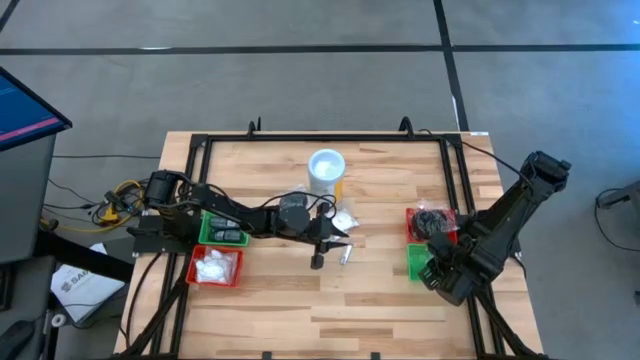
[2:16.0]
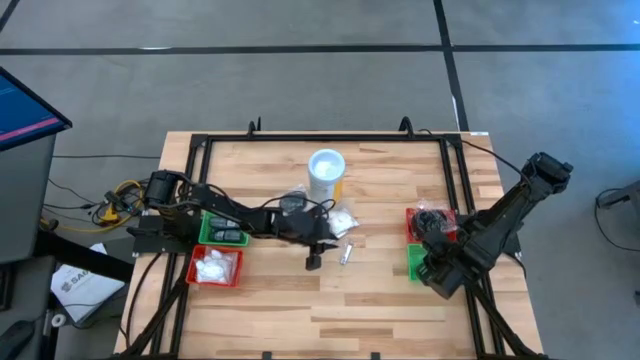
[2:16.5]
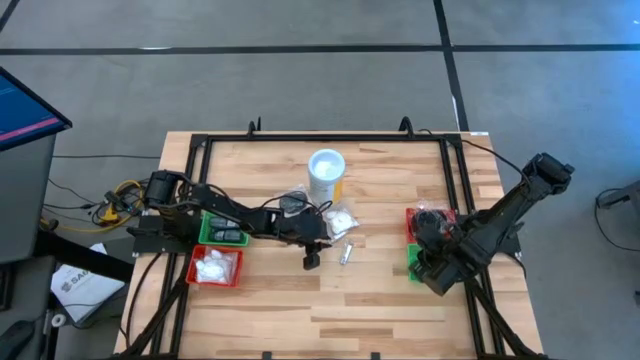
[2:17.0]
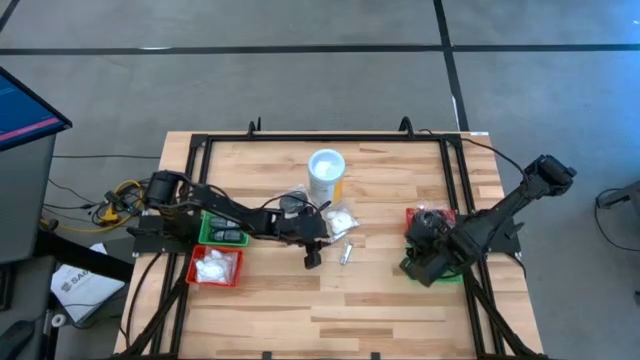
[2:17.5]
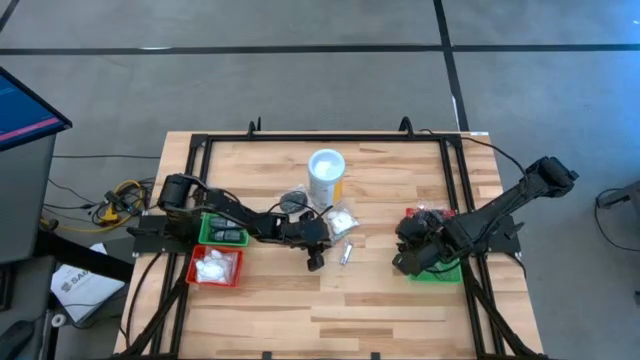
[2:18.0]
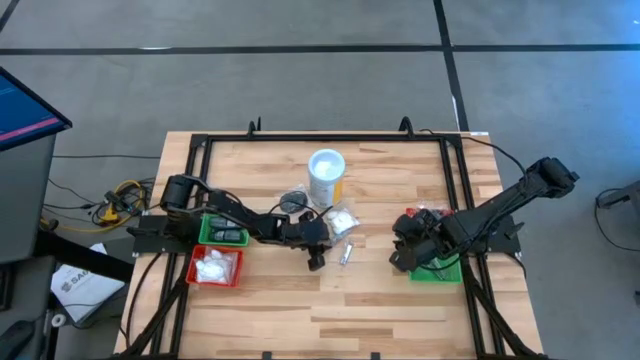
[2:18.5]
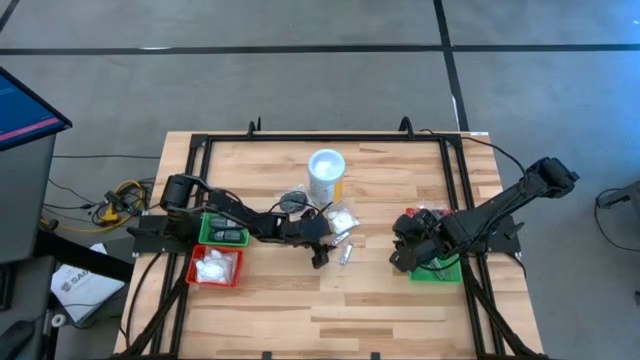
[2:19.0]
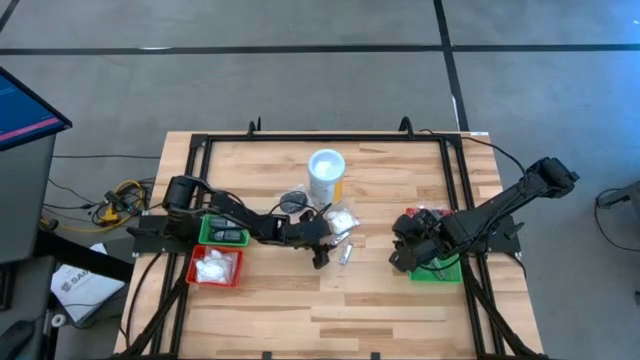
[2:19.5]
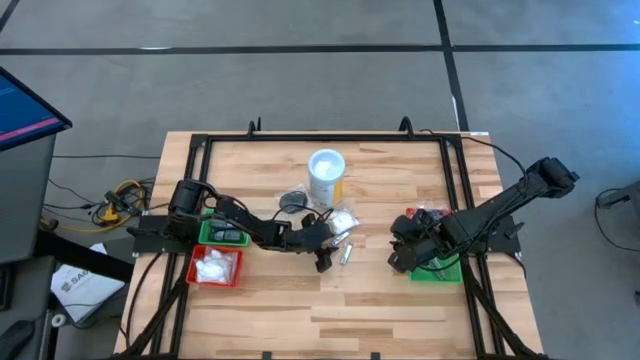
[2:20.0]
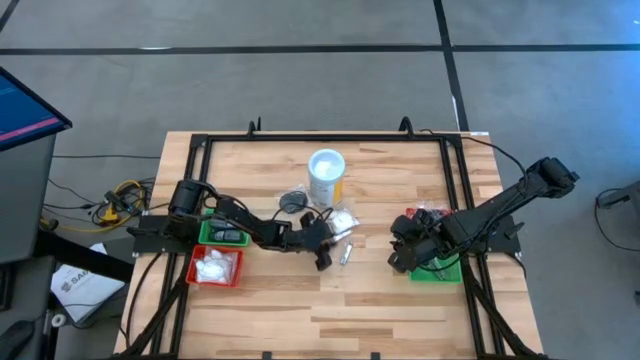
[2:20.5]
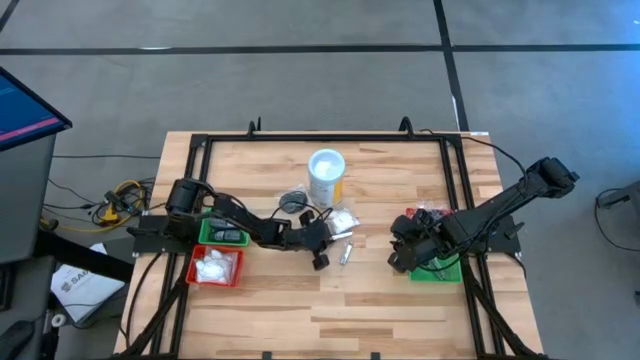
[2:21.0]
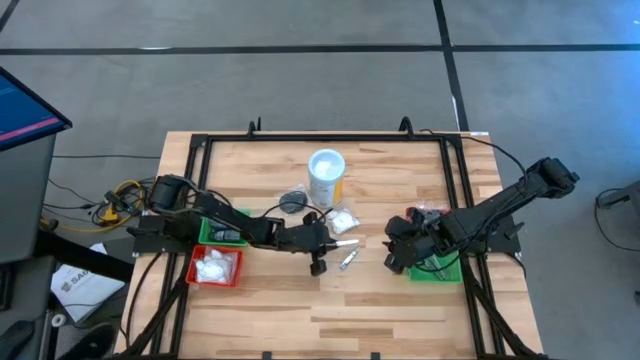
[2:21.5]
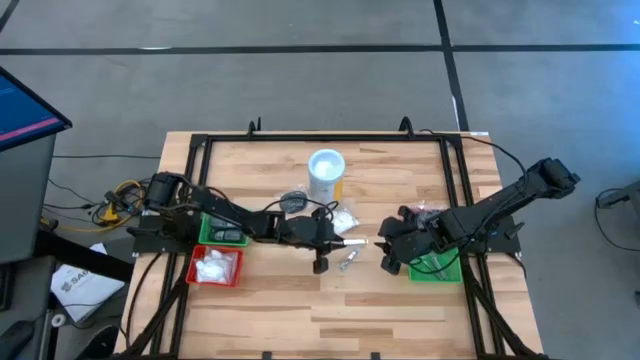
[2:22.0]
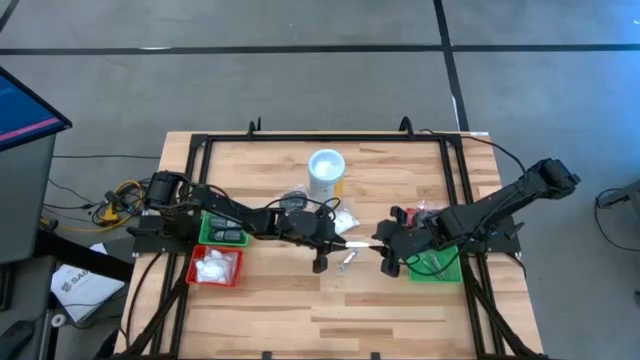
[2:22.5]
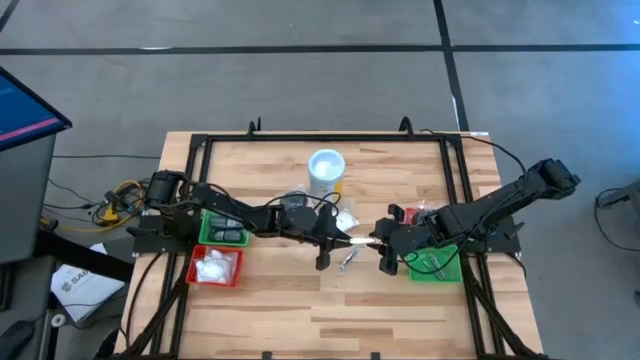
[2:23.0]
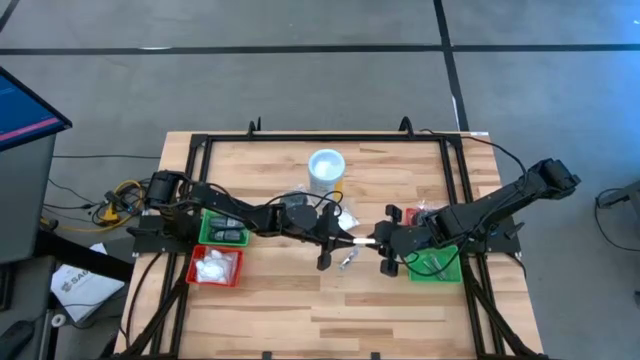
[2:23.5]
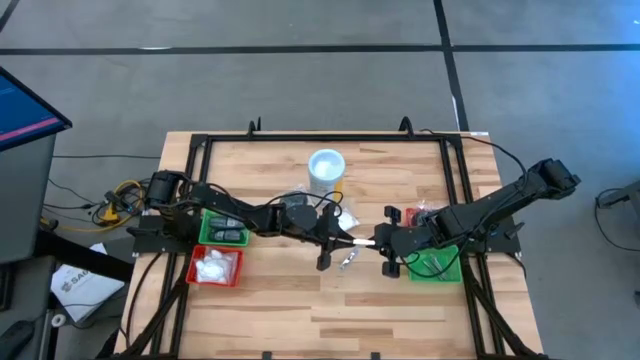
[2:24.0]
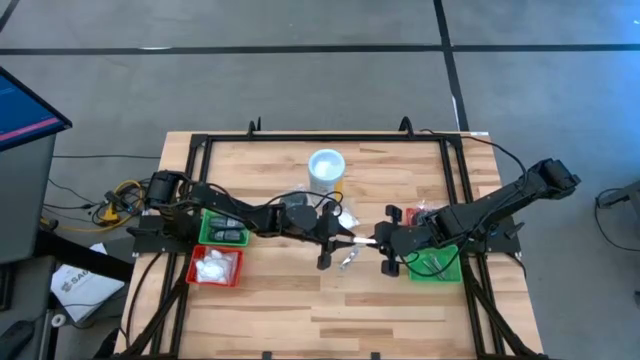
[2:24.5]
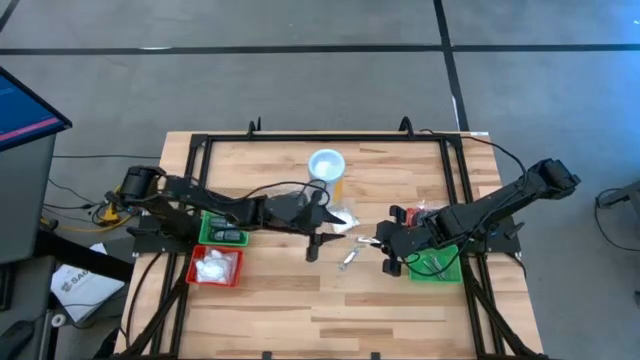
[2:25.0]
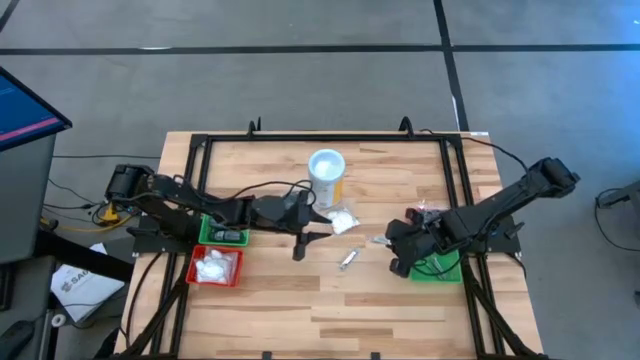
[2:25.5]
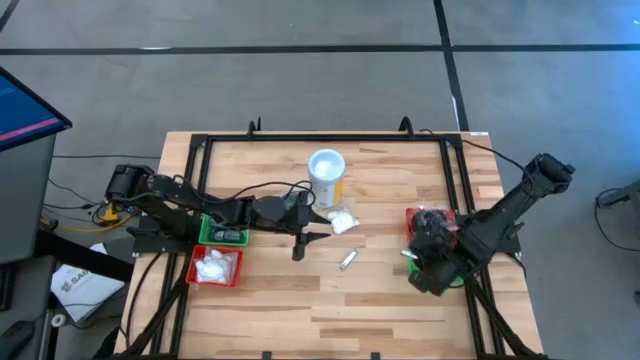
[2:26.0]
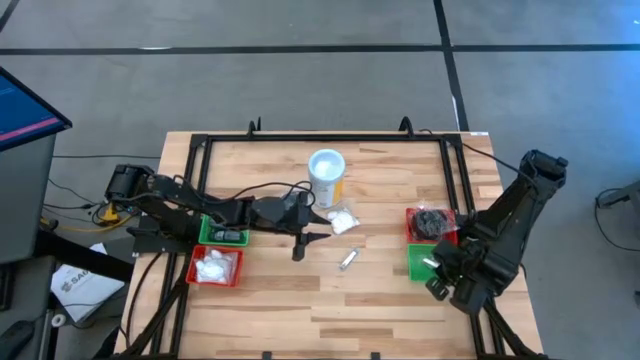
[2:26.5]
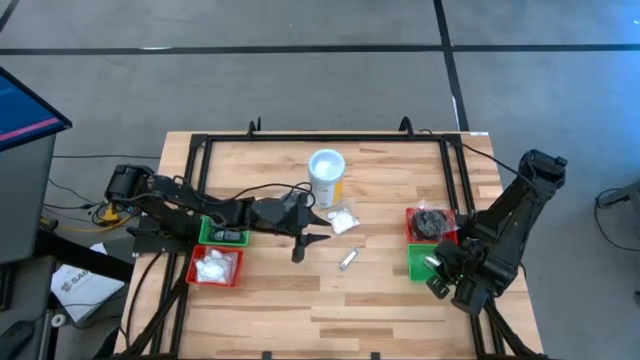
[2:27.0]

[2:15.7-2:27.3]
Task: Pick & Place Travel size toiletries
Put the nail cutter into the right green bin

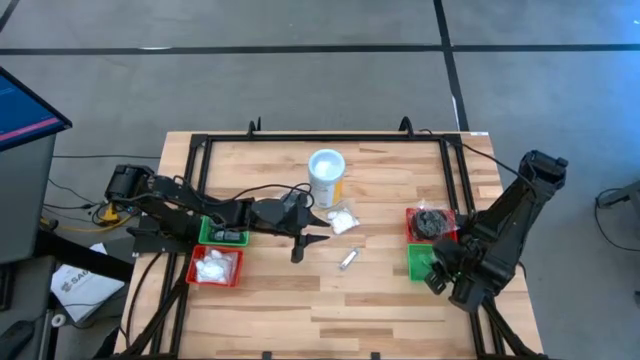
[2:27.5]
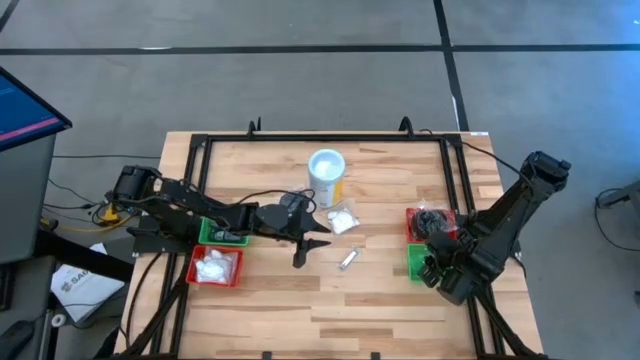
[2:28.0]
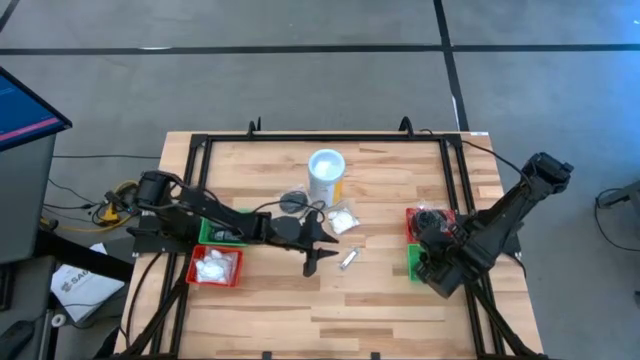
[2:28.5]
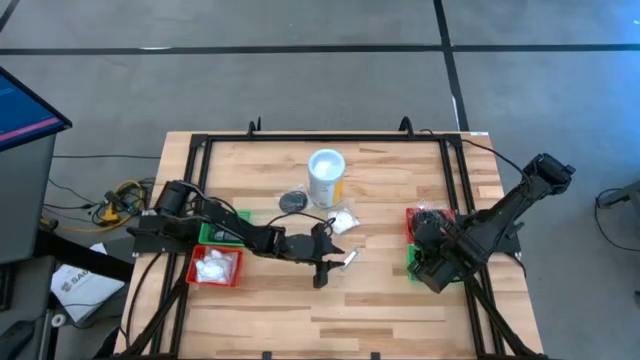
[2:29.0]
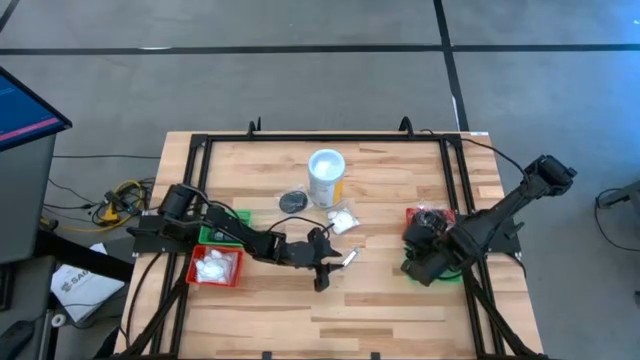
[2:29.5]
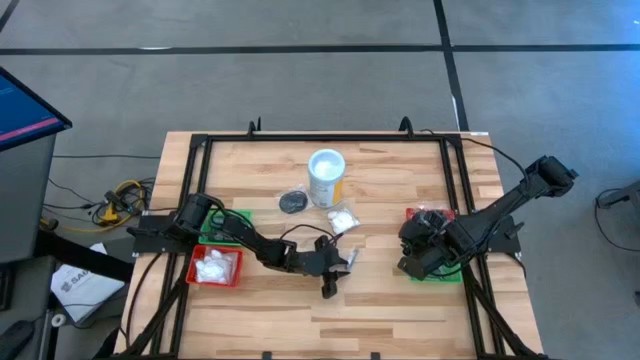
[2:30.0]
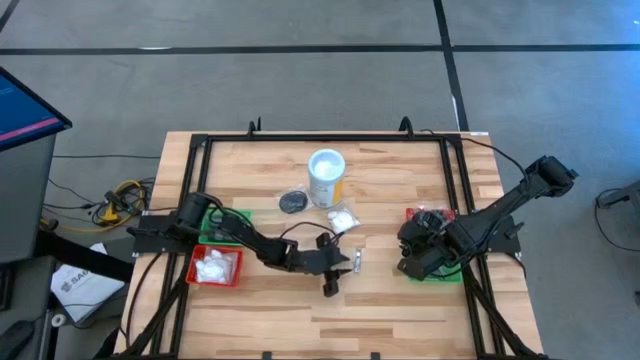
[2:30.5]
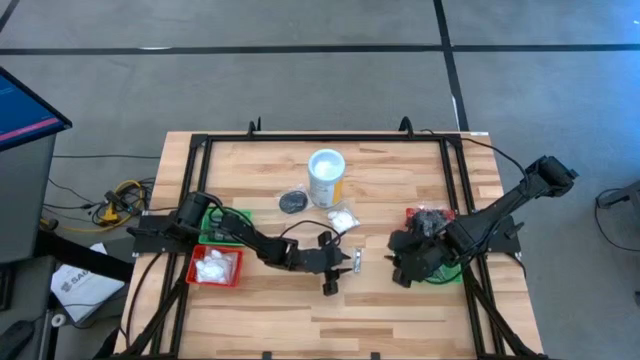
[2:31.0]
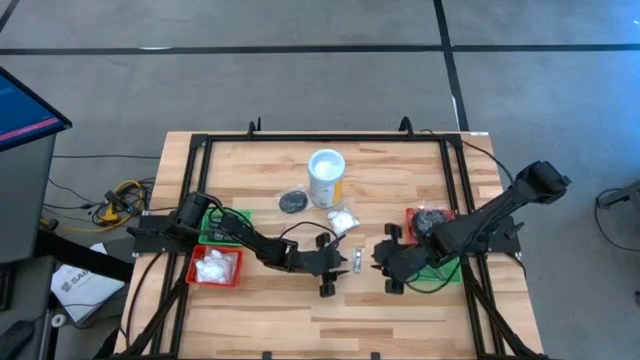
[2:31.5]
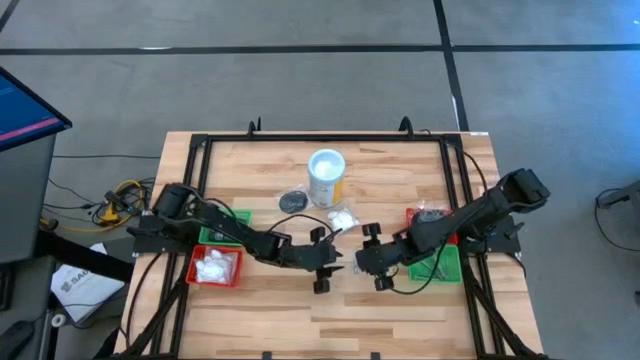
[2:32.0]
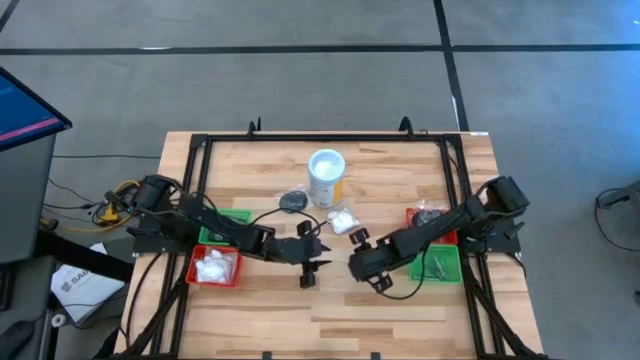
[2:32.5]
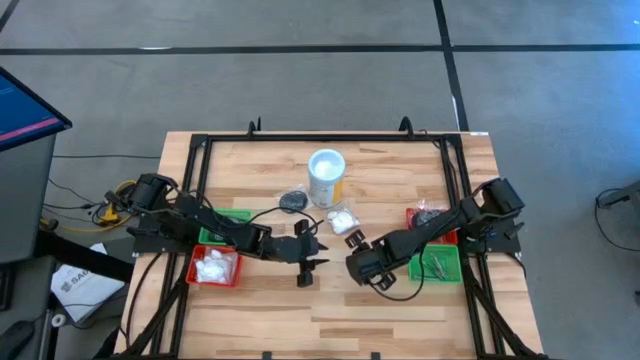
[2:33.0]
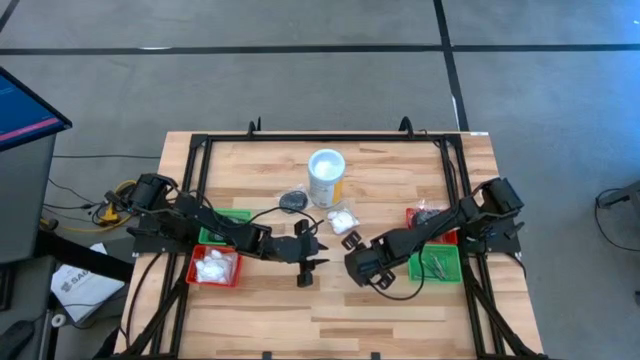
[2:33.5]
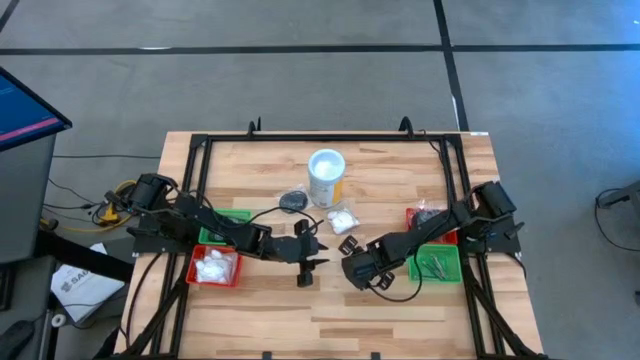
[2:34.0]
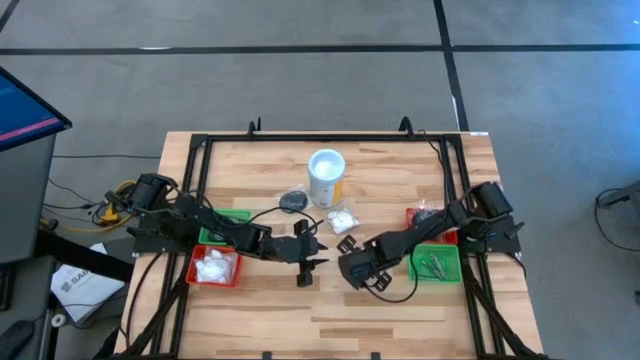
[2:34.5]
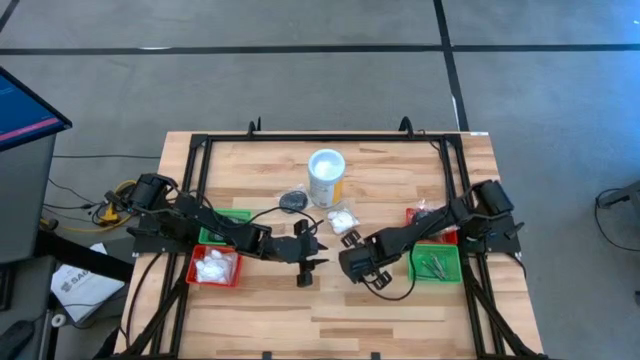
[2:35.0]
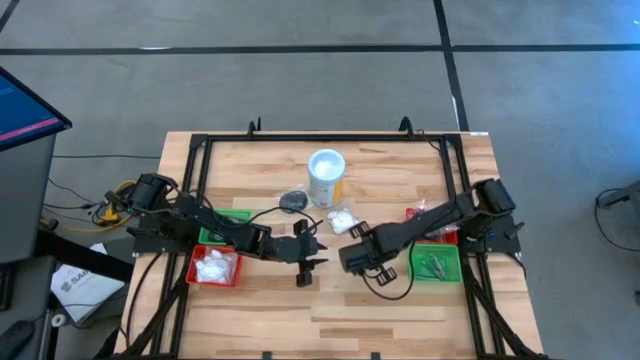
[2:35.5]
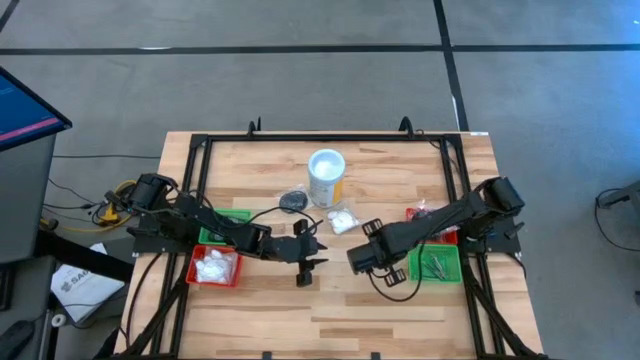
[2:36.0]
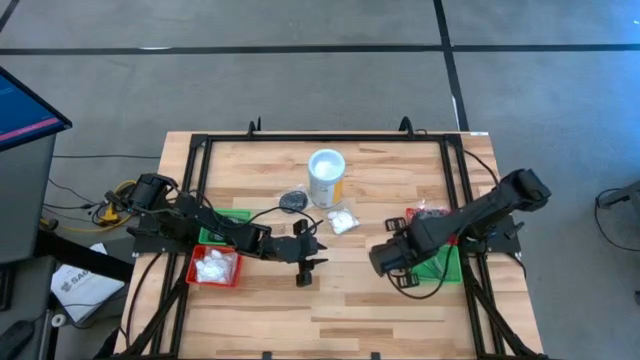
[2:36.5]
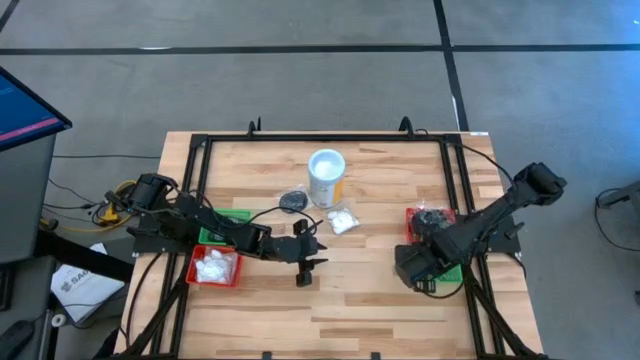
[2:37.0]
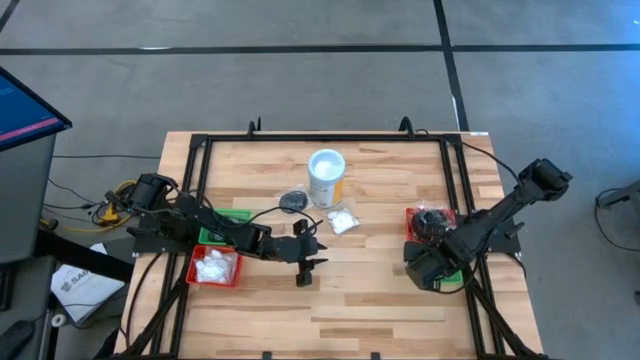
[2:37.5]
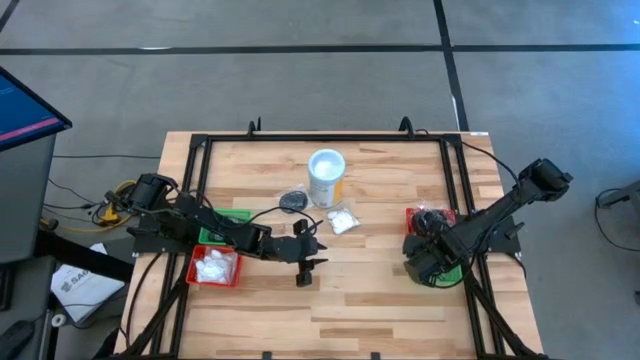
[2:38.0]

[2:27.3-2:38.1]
Put the nail cutter into the right green bin

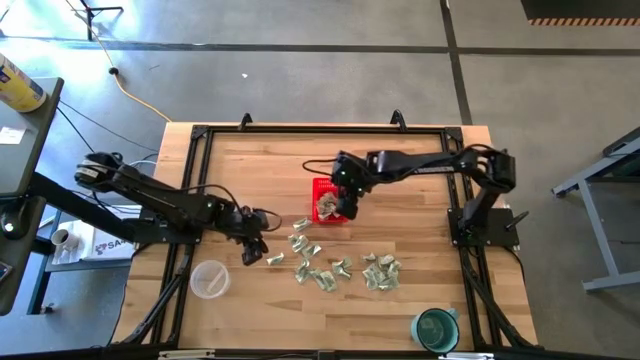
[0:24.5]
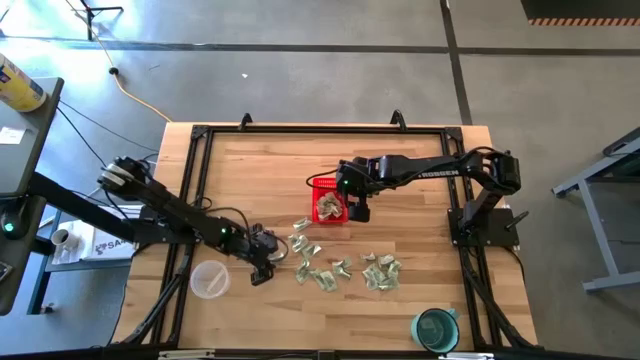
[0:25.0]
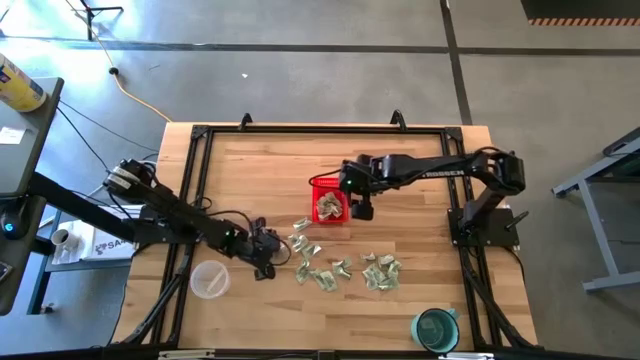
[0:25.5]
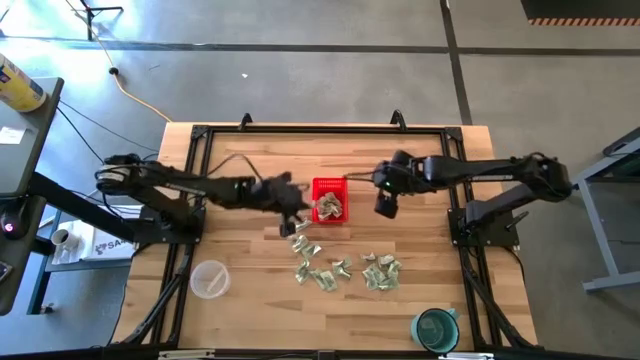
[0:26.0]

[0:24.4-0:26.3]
Task: Pick and place items into bin
Put the light green stevia packet into the red bin
